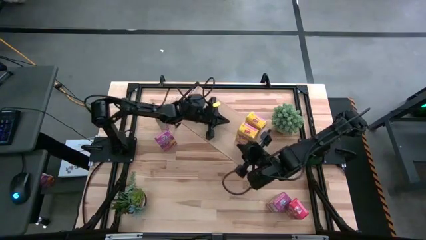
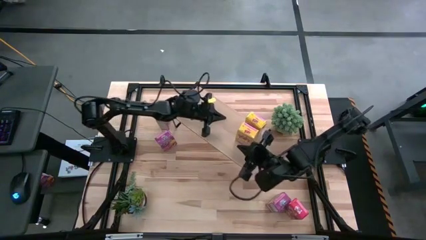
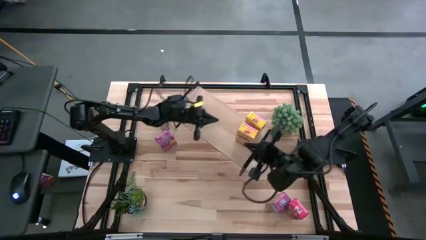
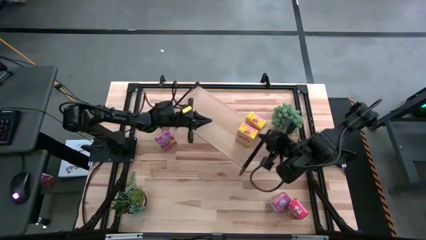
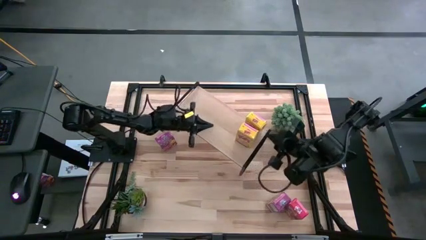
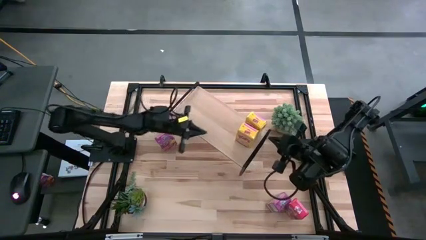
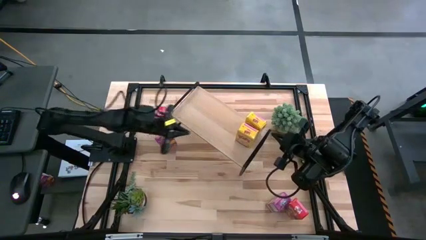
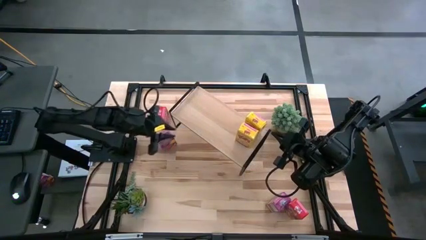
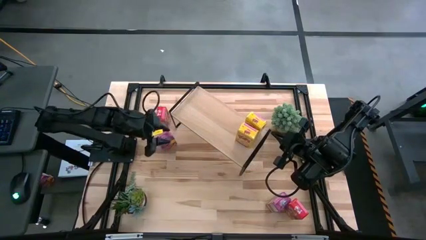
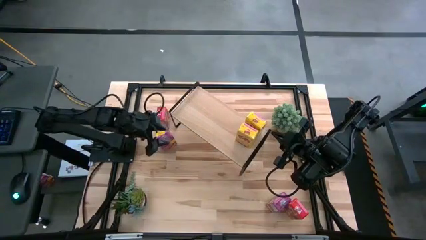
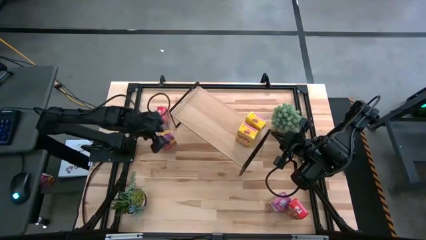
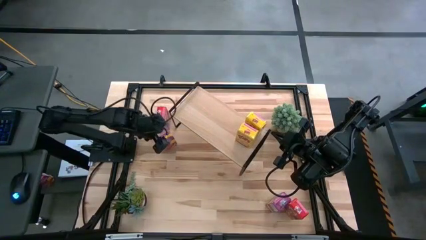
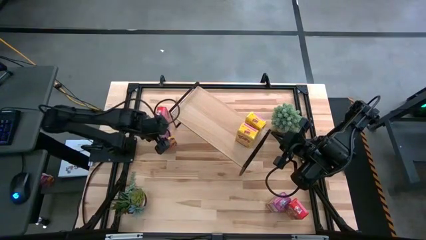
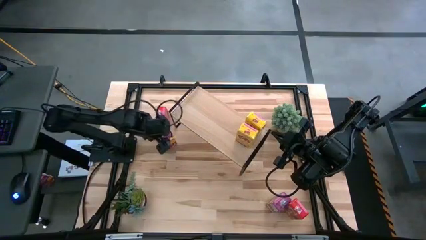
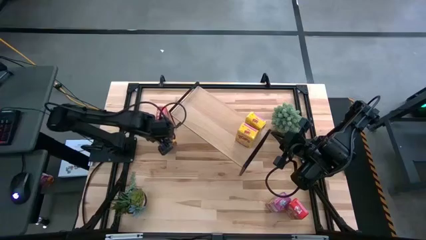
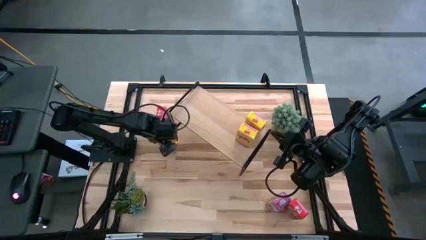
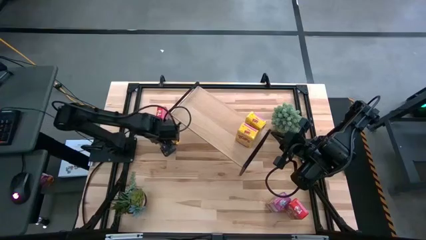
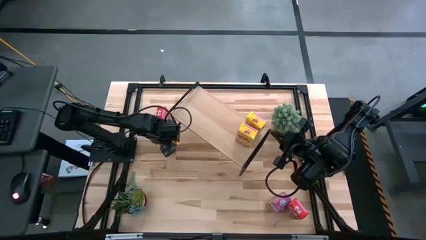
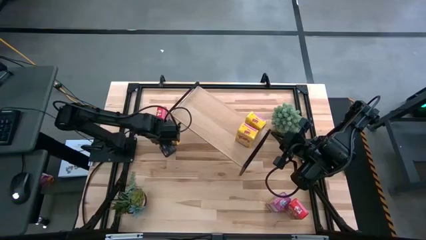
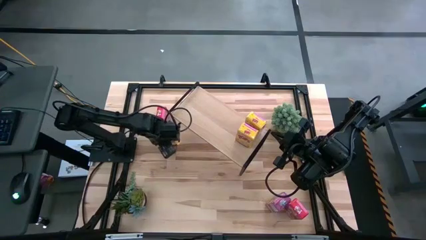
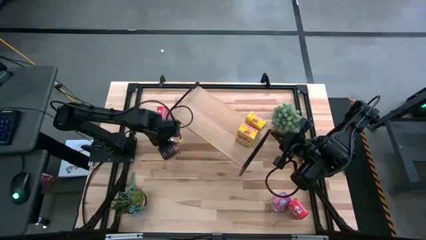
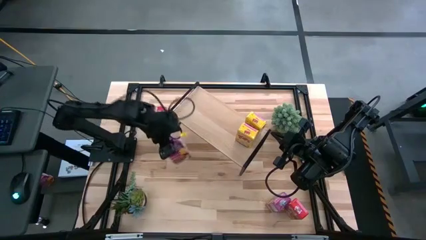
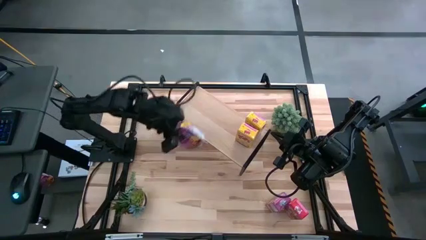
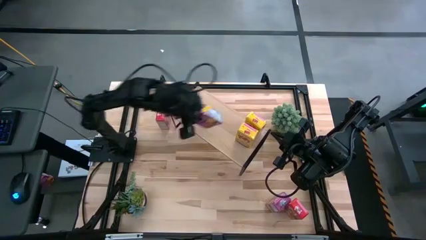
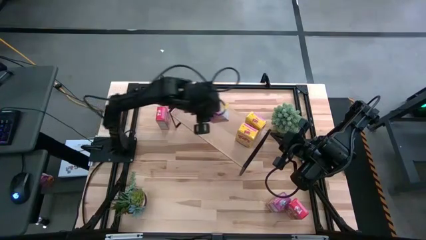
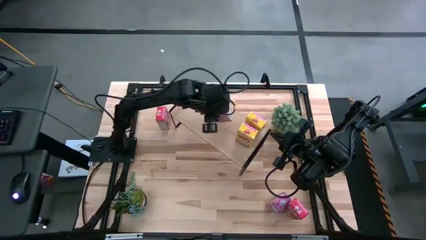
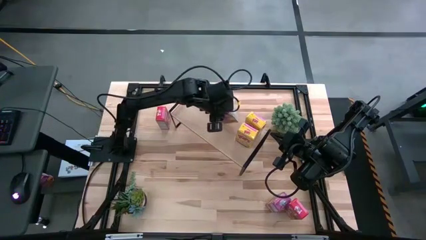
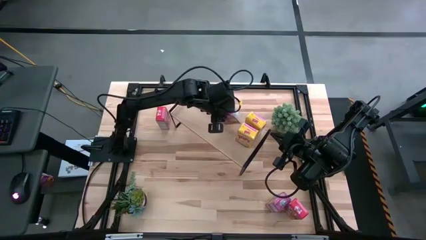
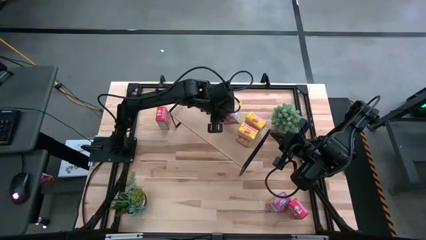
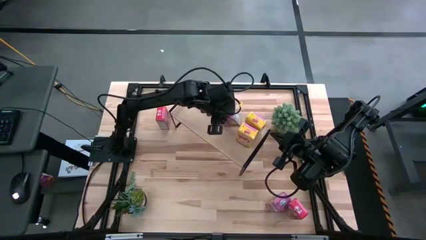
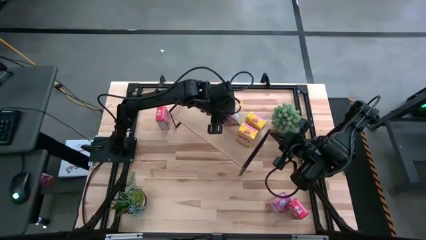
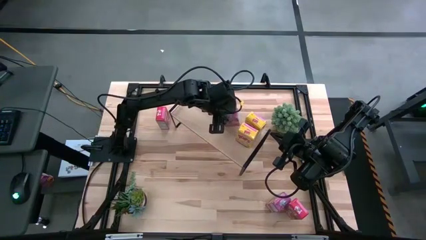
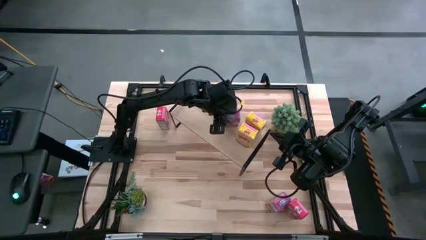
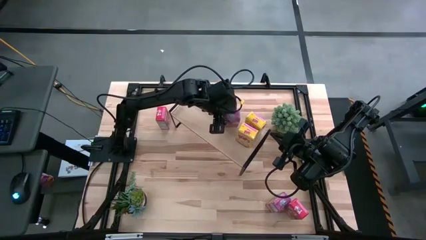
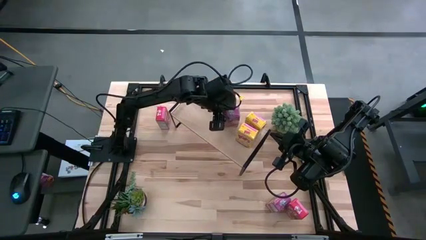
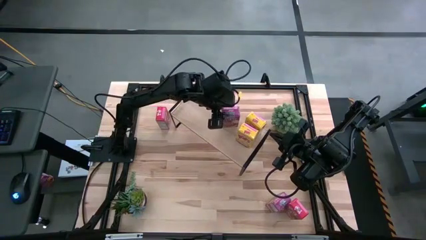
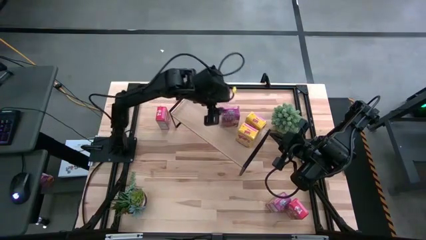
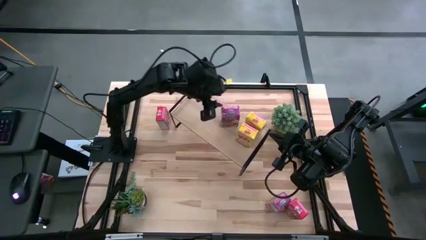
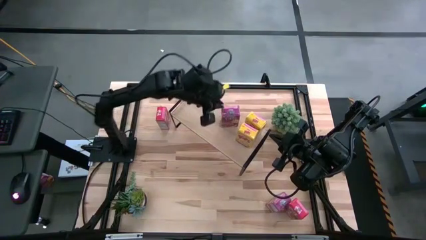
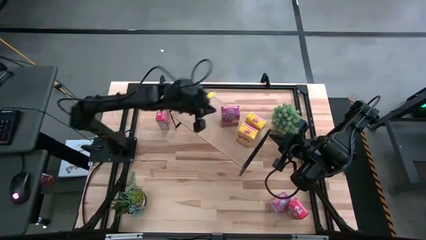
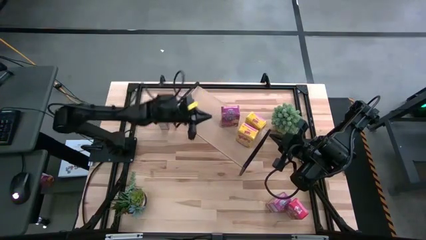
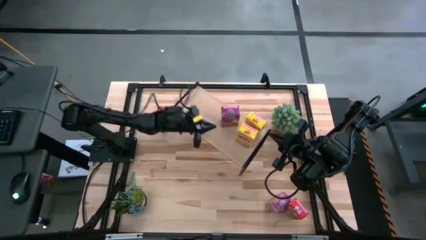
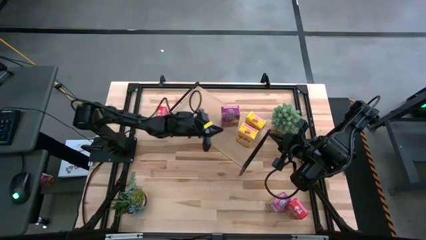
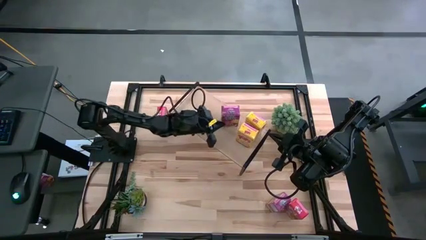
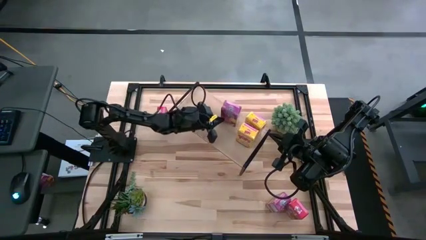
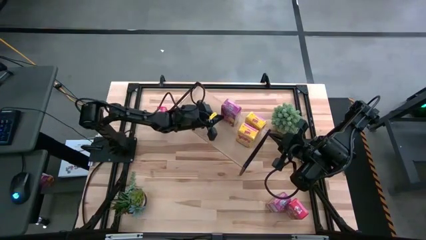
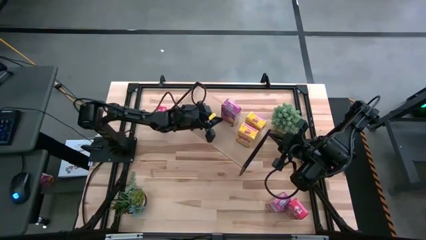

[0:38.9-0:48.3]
Task: Stack cereal on shelf
Put the top violet cereal box on the shelf

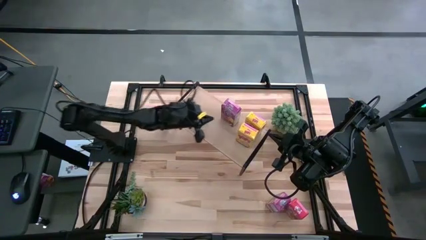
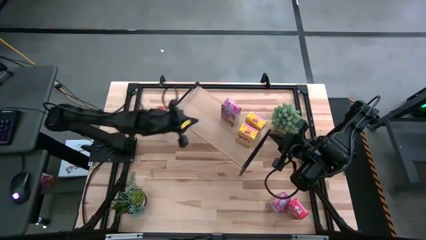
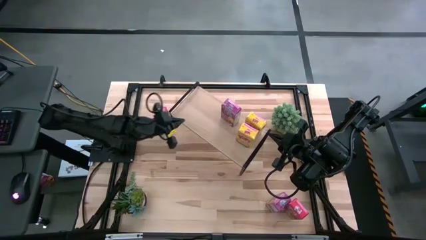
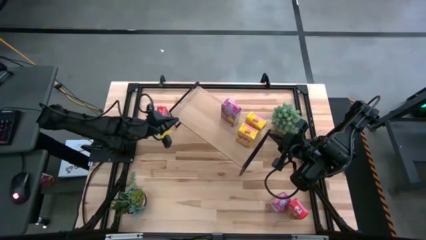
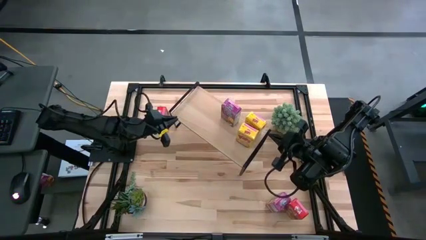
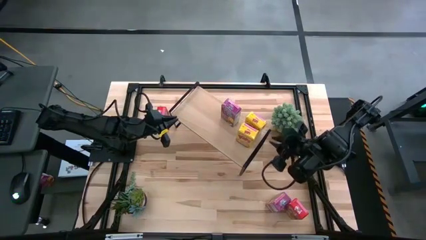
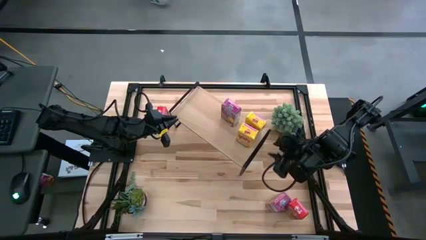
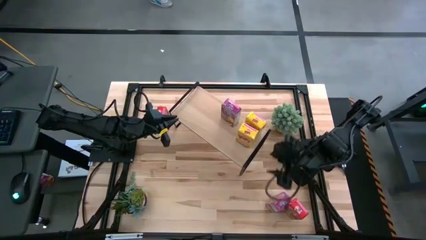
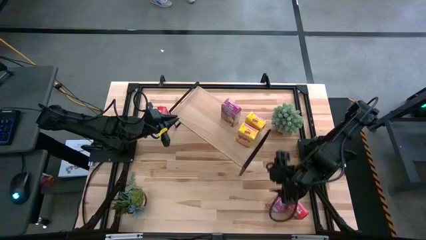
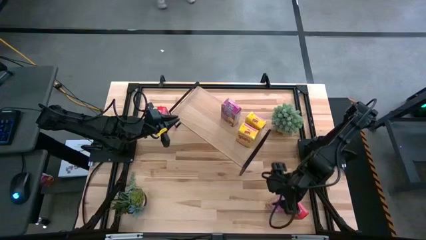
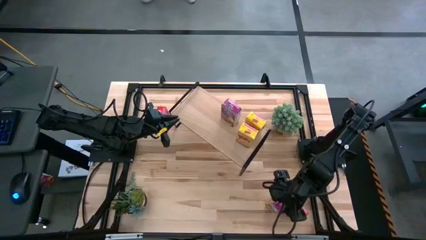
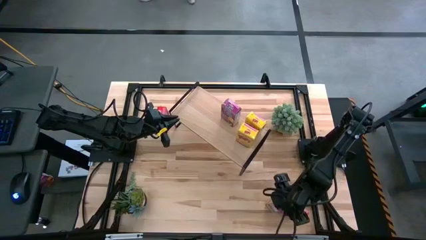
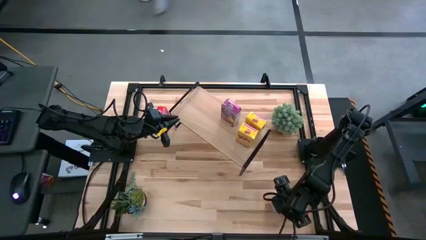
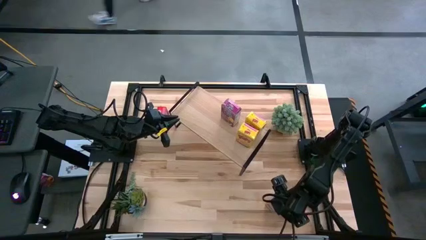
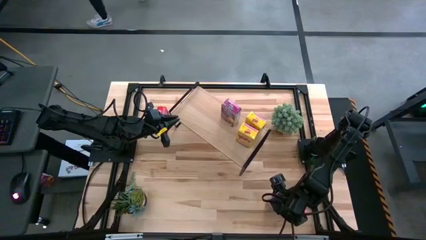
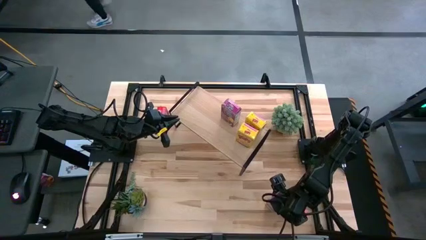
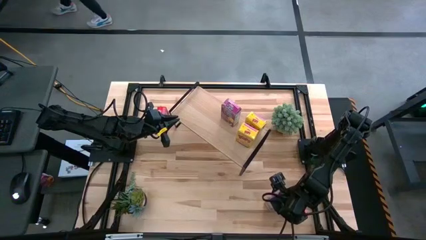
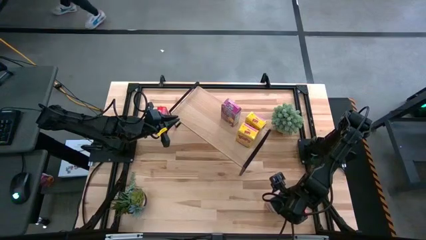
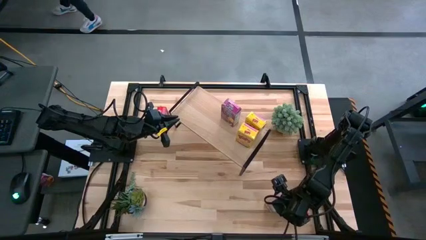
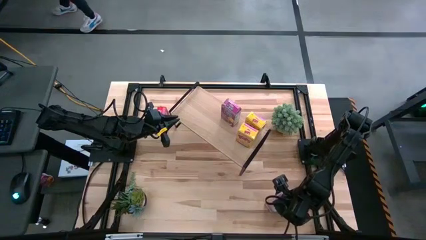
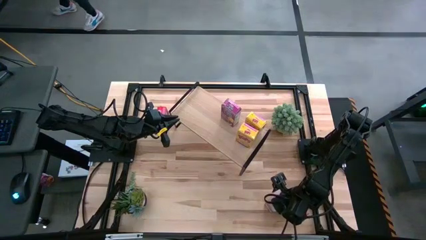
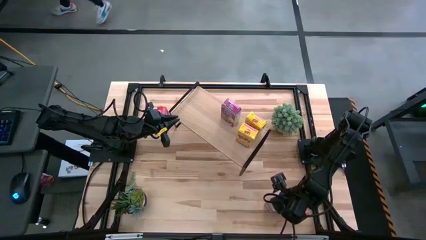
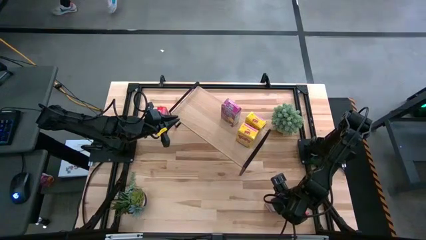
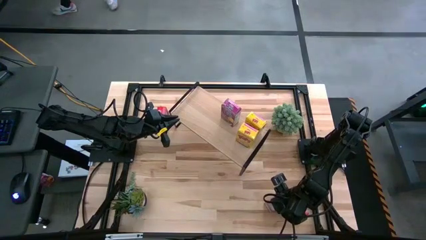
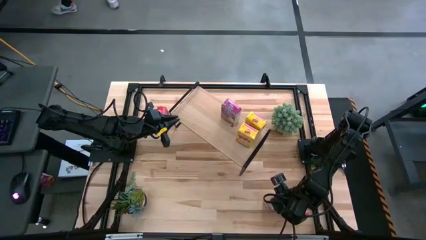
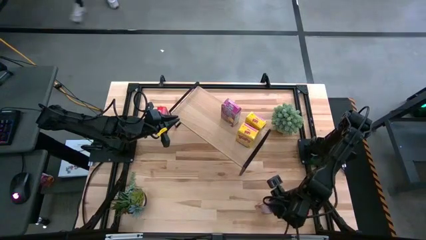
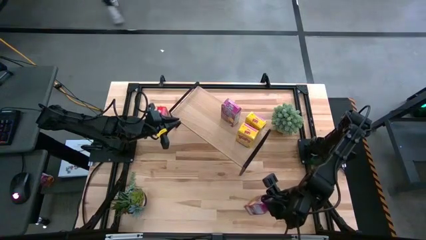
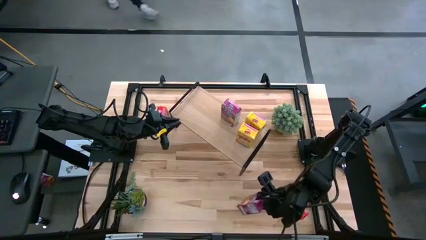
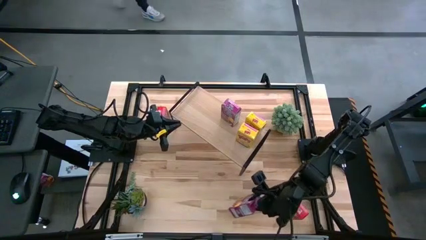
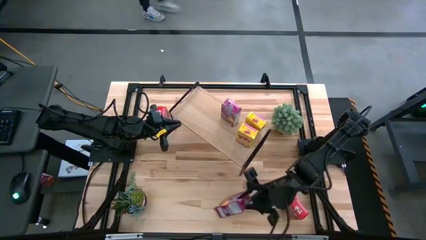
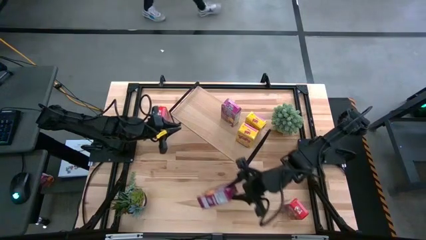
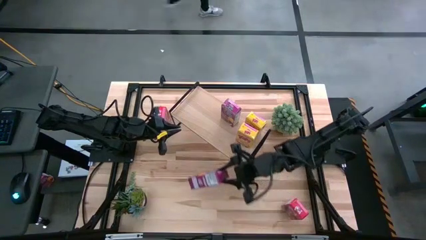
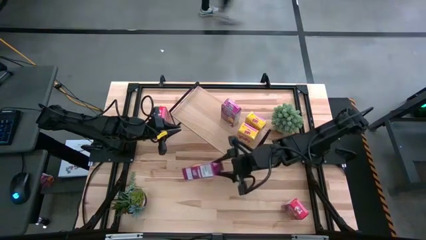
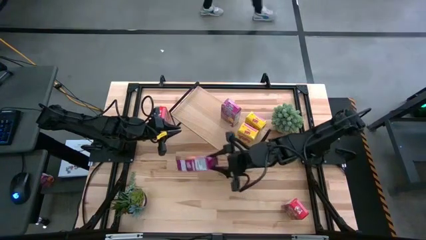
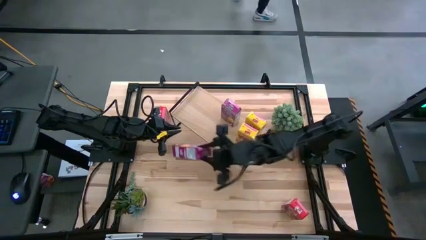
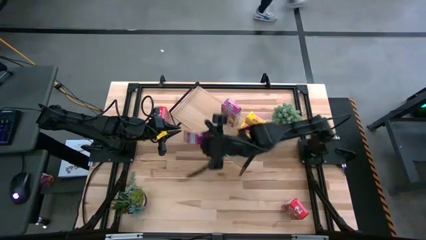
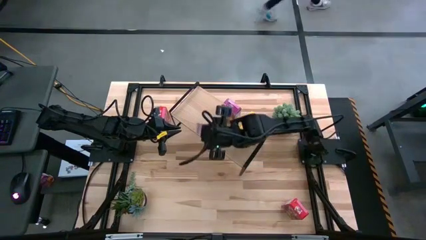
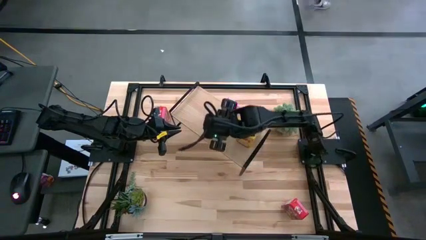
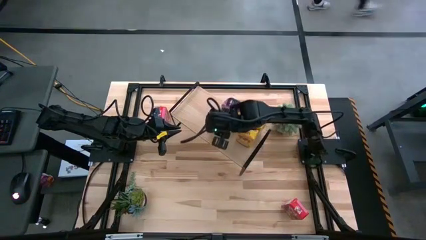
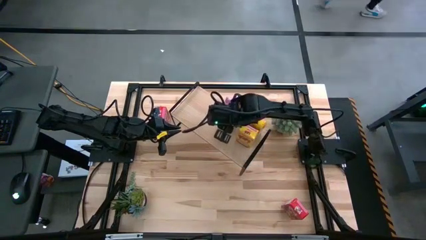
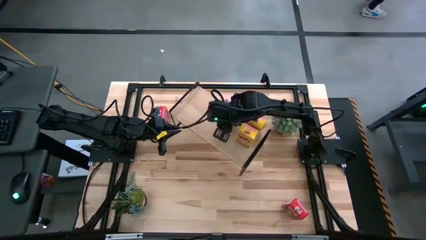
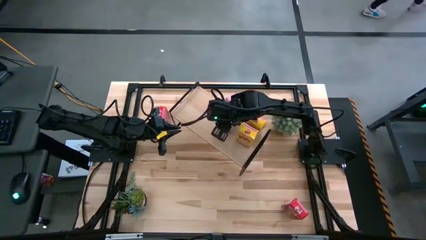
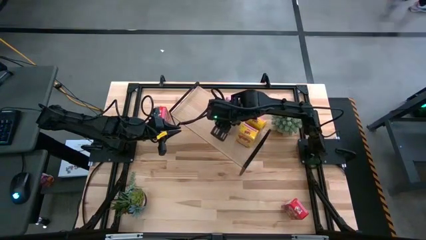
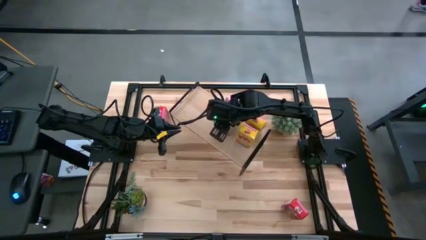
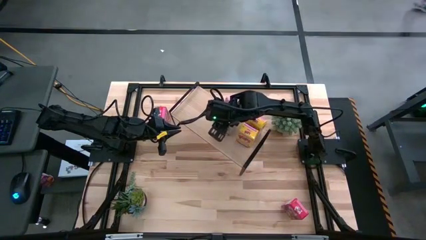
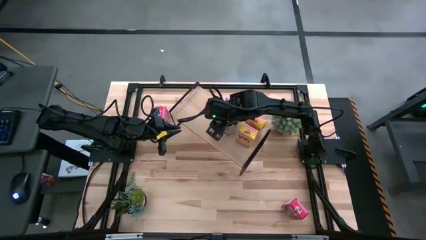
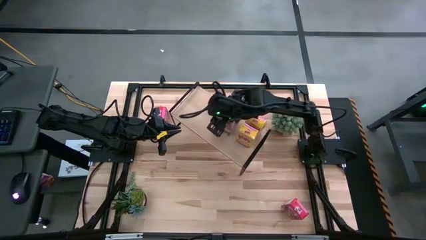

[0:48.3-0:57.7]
Put the violet cereal box on the shelf
